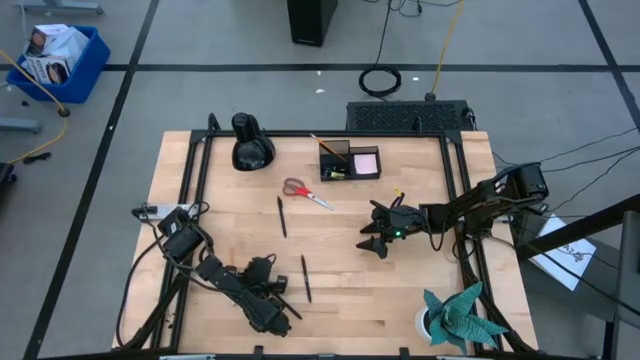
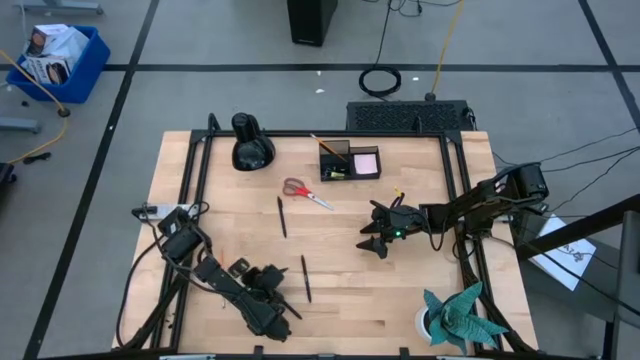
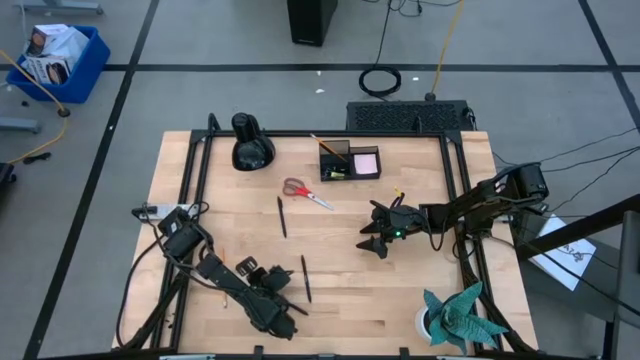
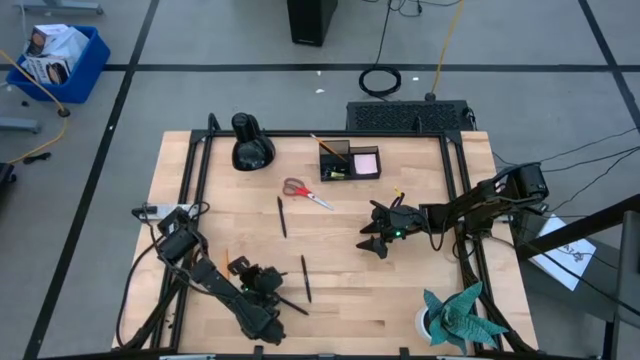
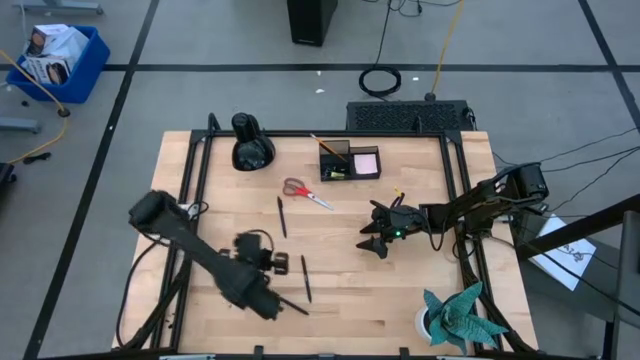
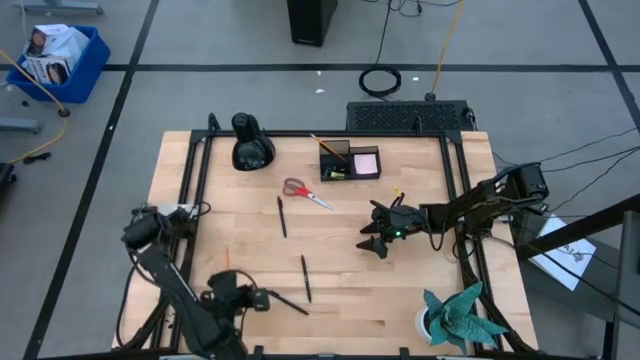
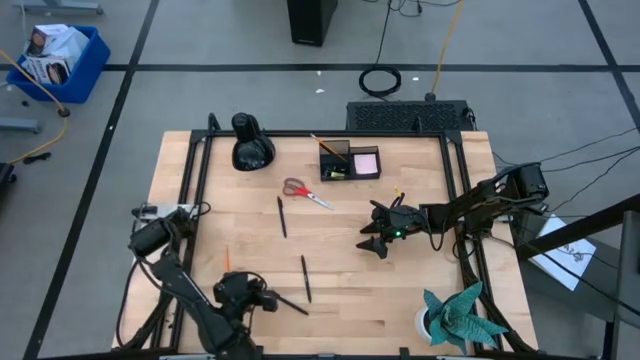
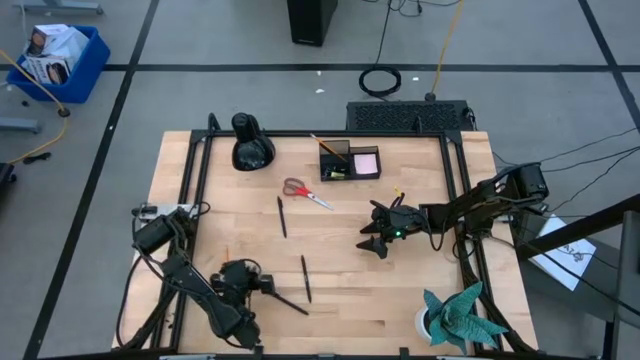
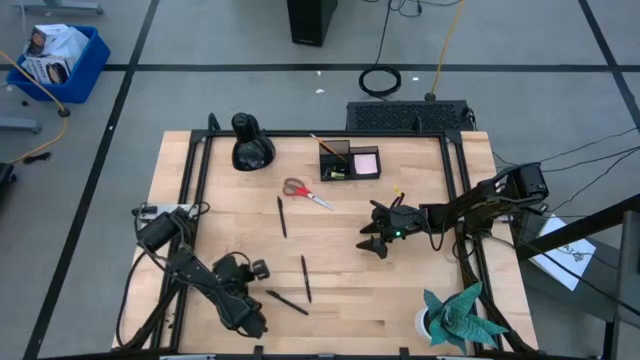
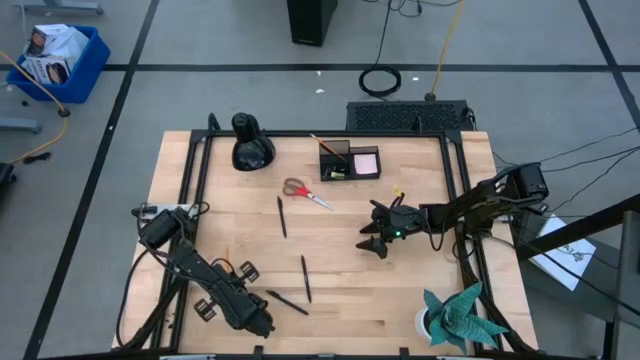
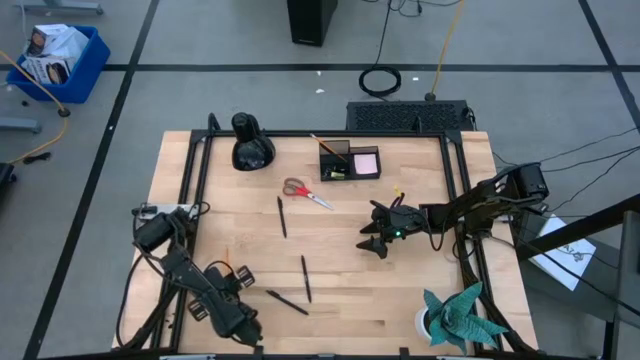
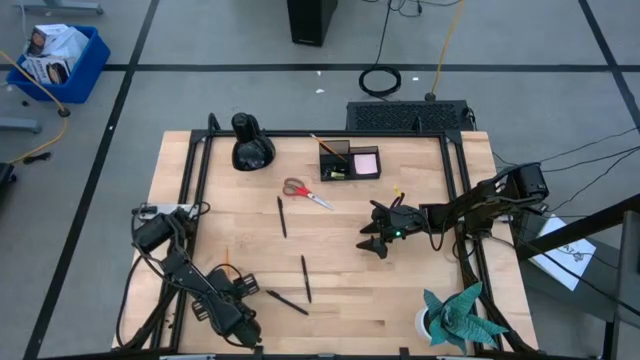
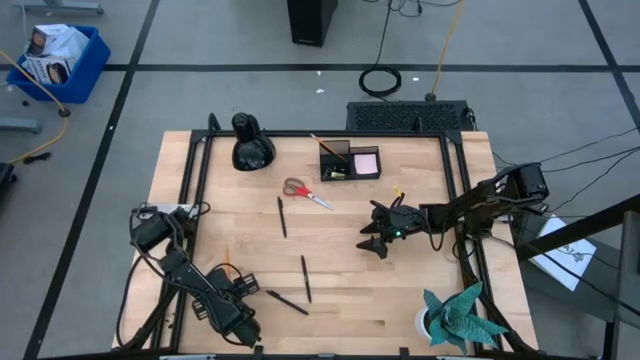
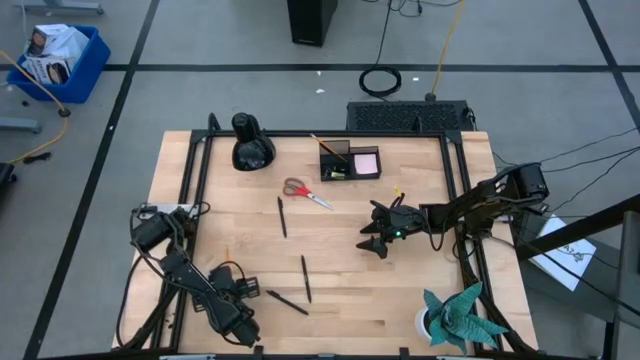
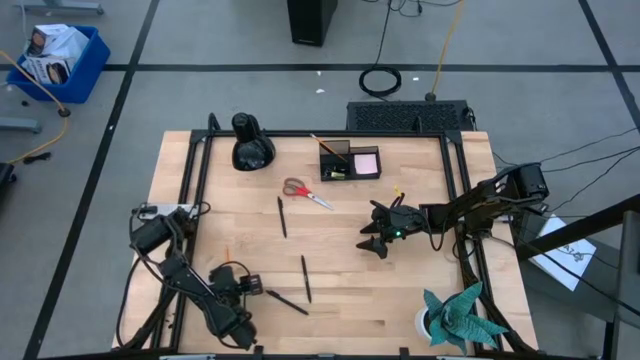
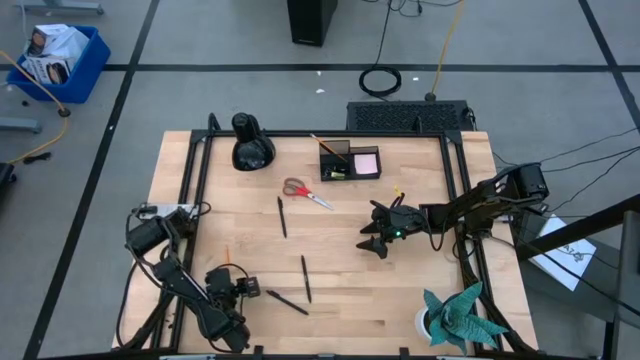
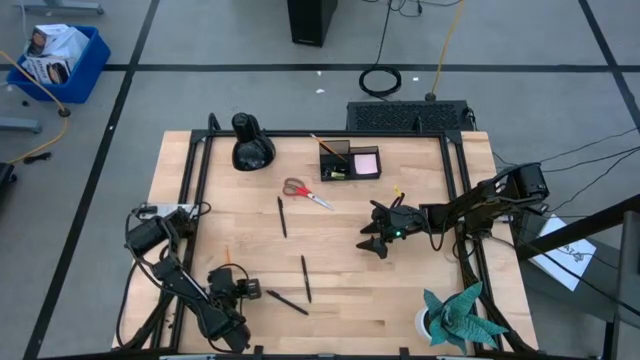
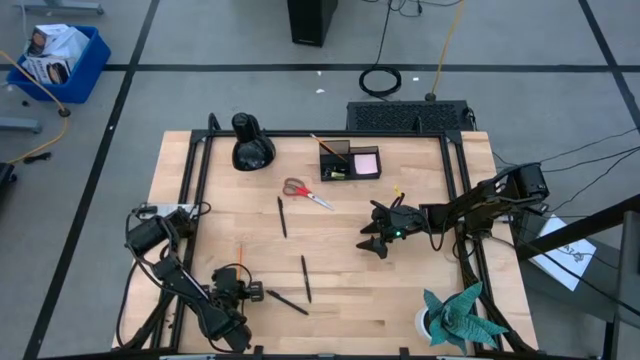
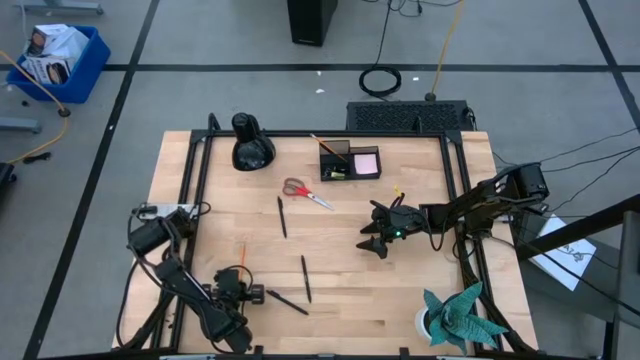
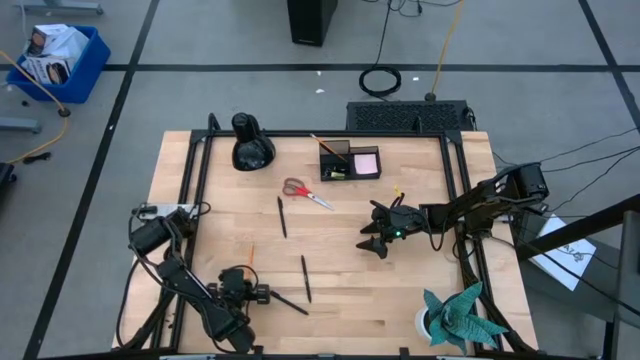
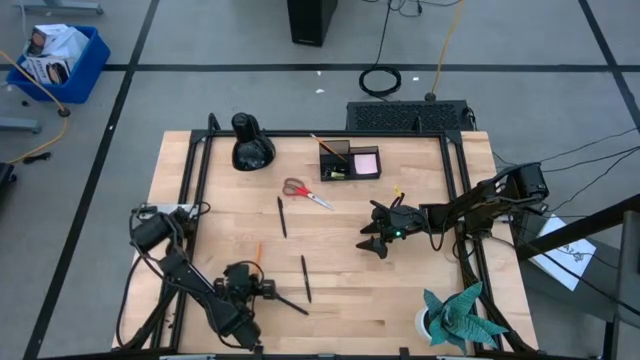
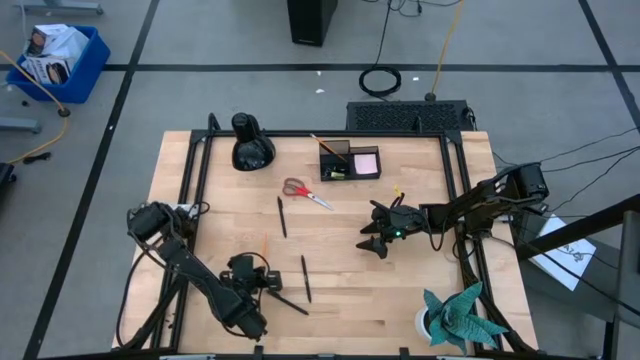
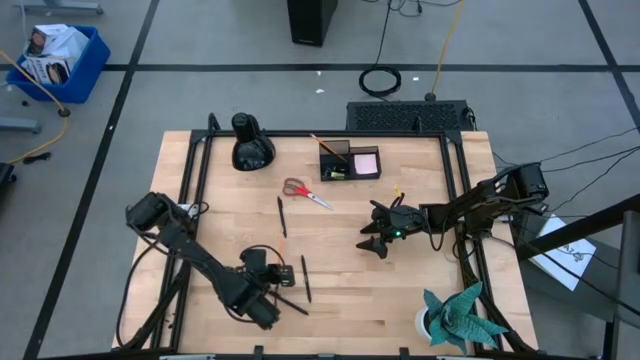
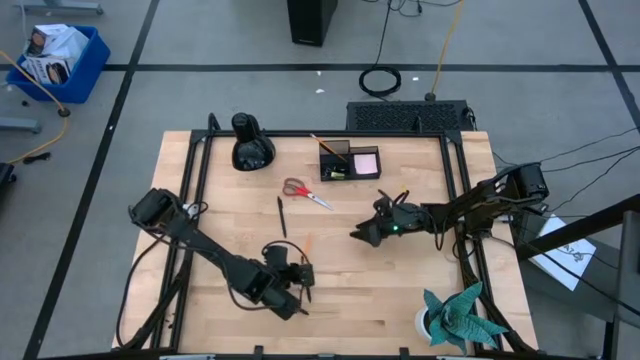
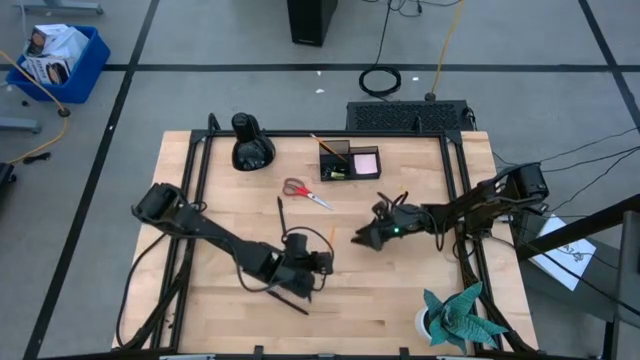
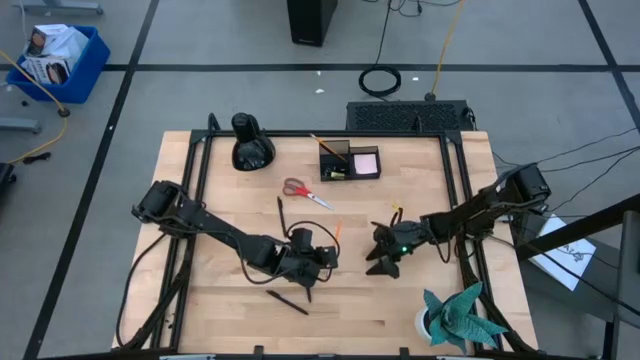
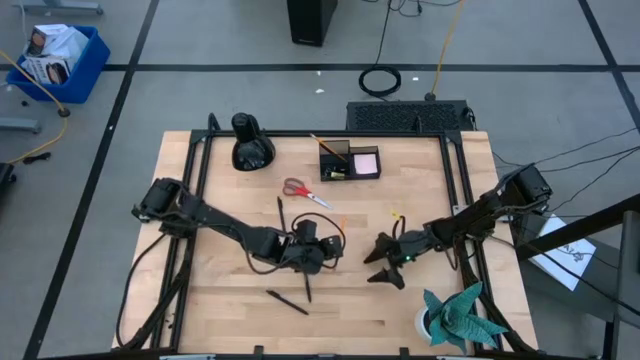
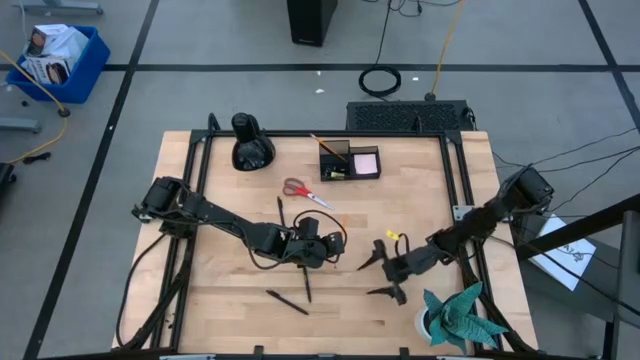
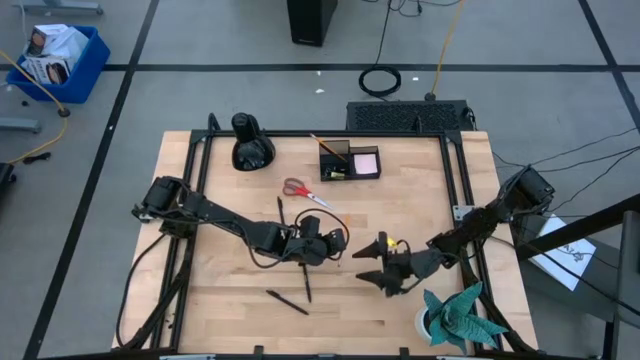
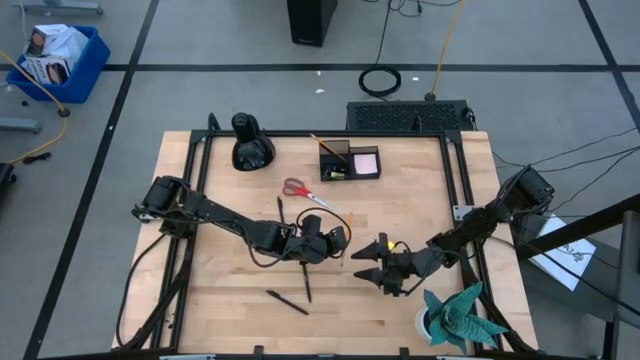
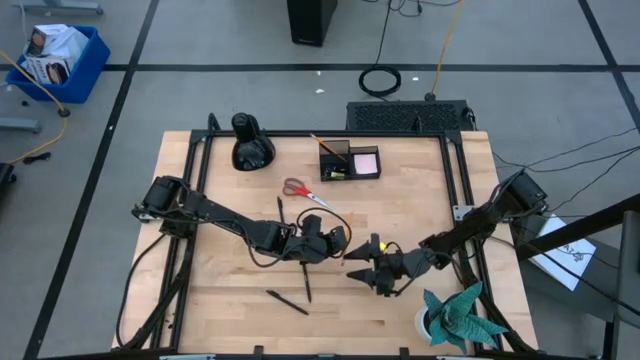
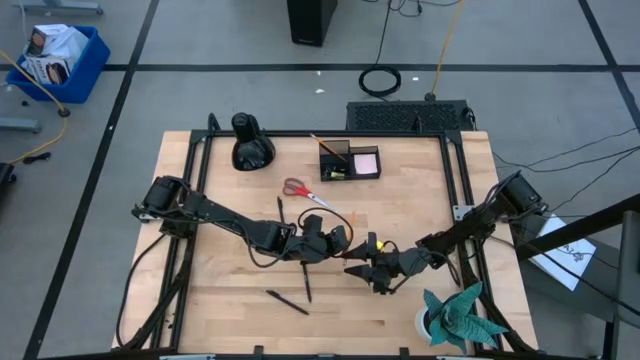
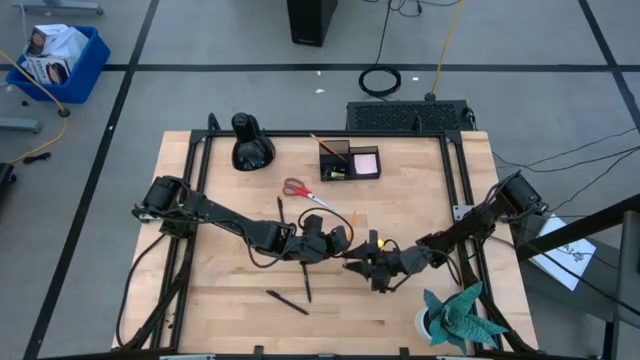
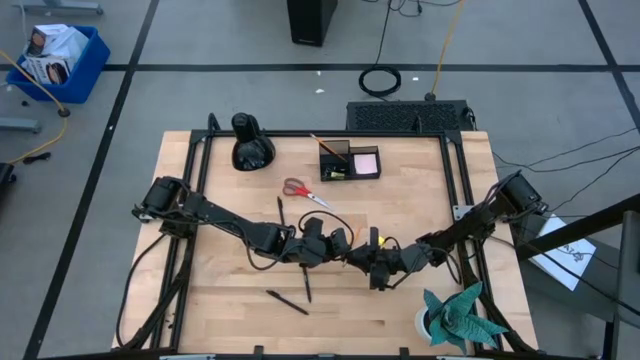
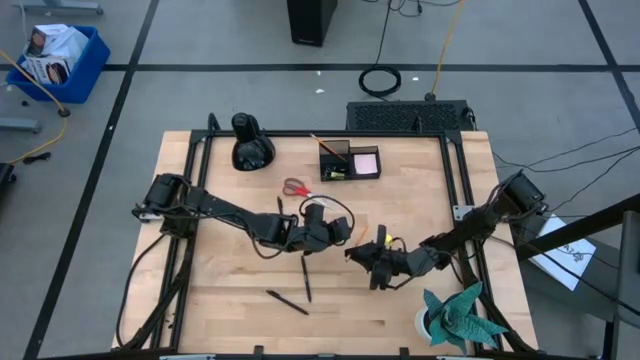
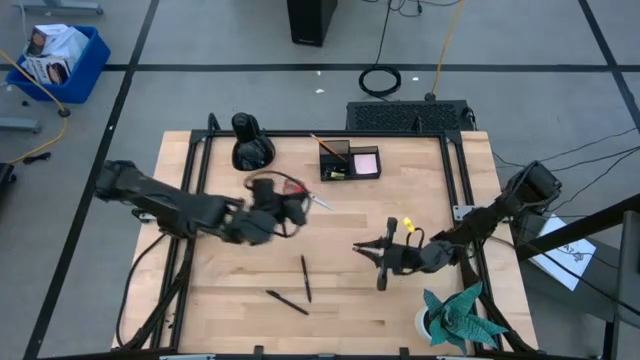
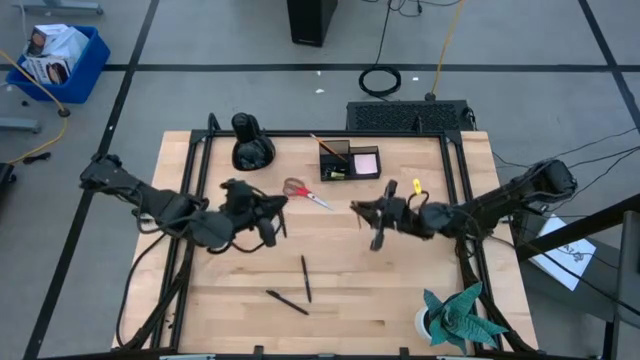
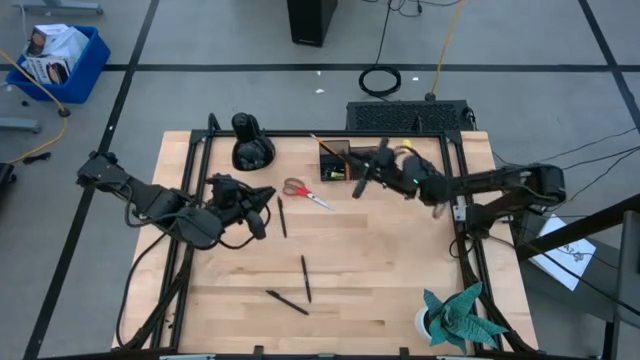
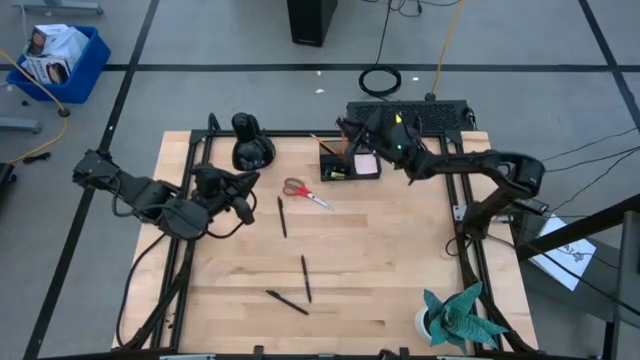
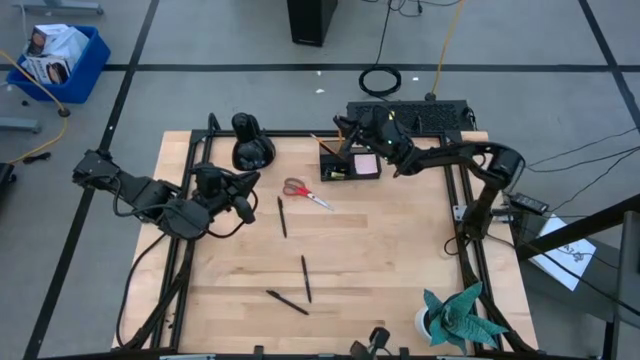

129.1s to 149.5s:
Task: Pick and place office supplies into organizer
Put the orange pencil into the black desk organizer

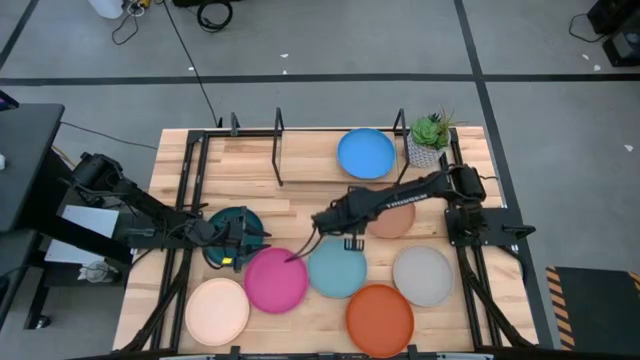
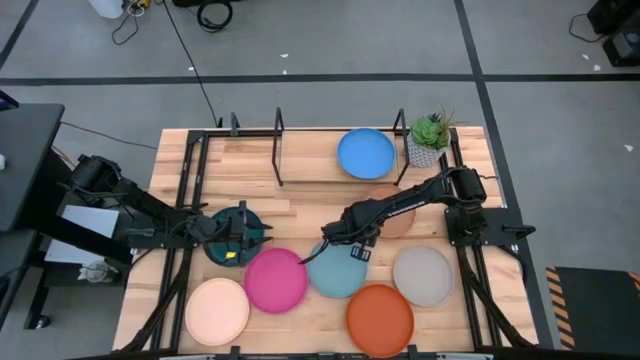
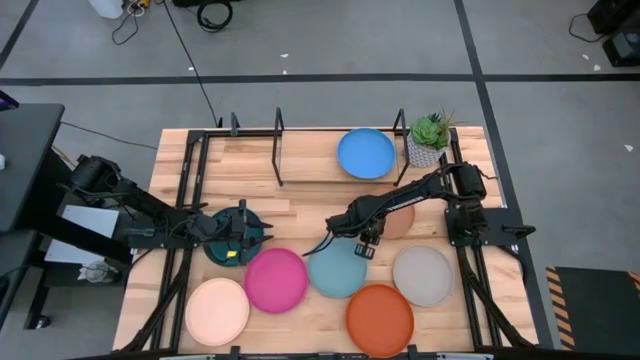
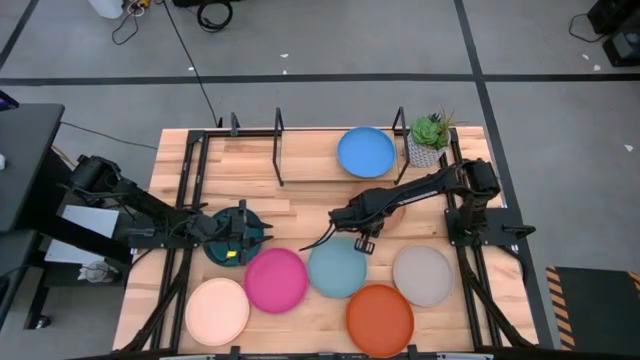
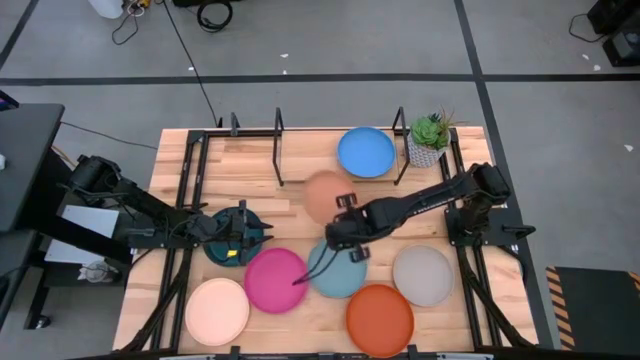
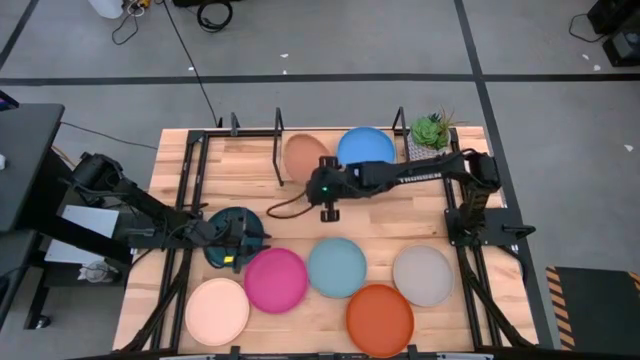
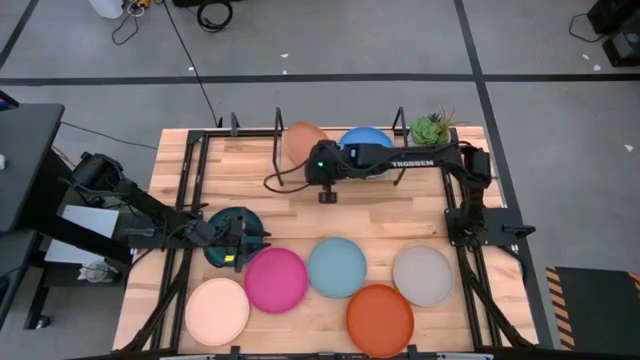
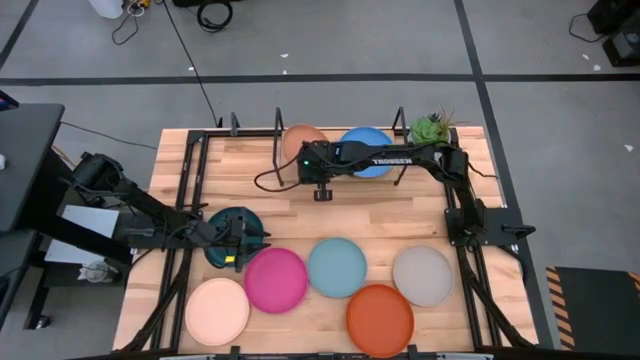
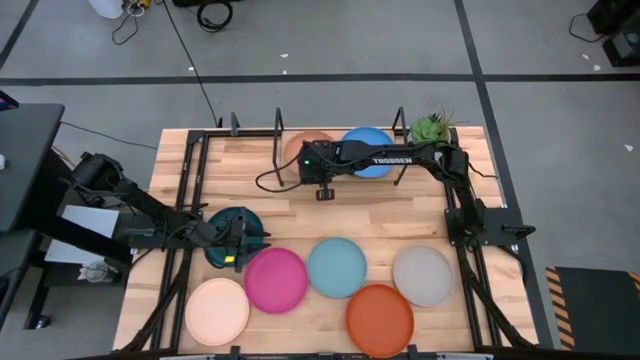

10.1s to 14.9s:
Task: Place and stack plates onto a shelf
Put the brown plate on the shelf
